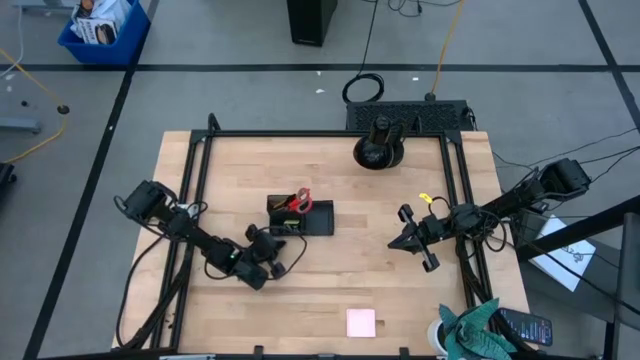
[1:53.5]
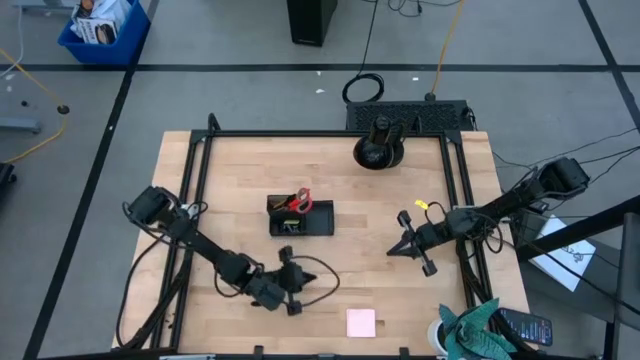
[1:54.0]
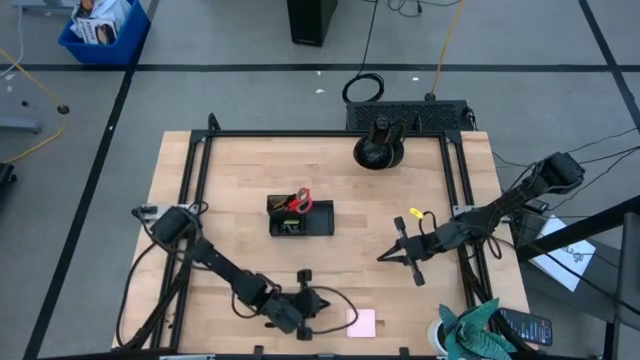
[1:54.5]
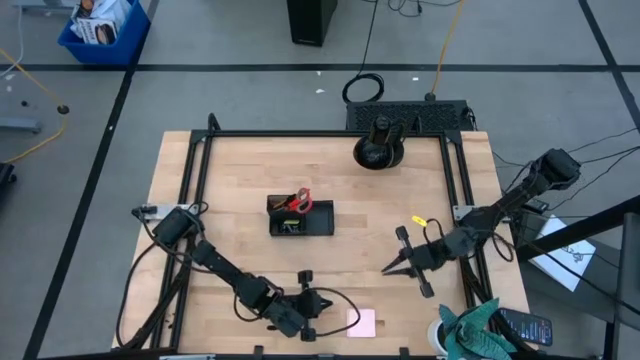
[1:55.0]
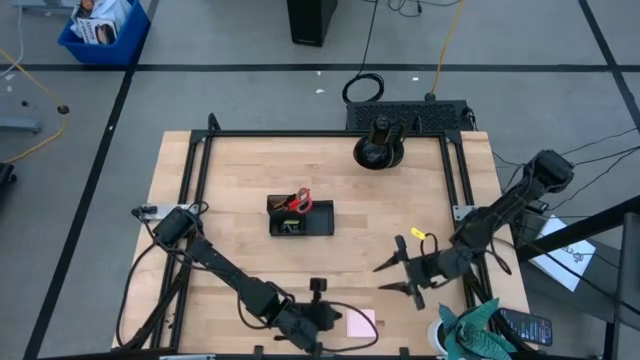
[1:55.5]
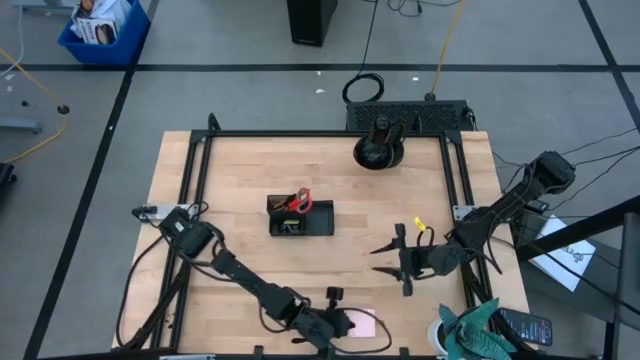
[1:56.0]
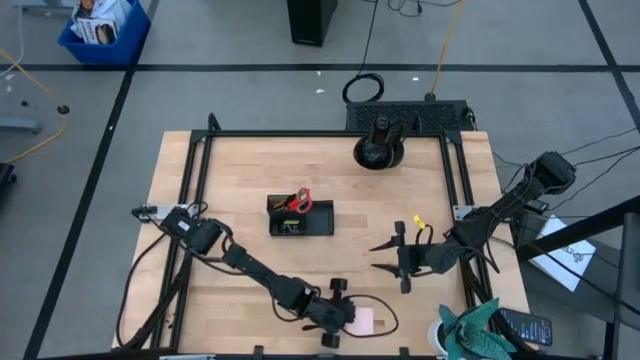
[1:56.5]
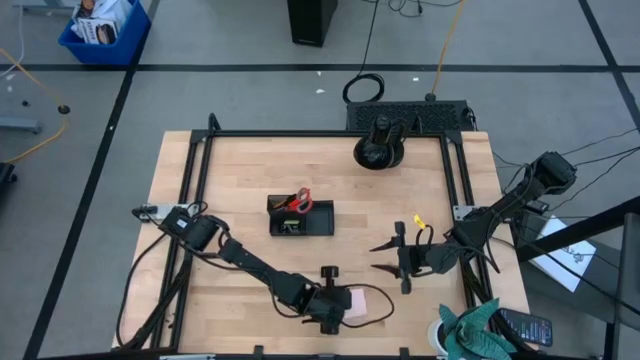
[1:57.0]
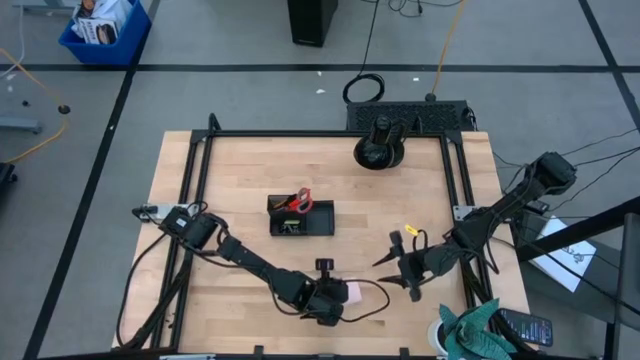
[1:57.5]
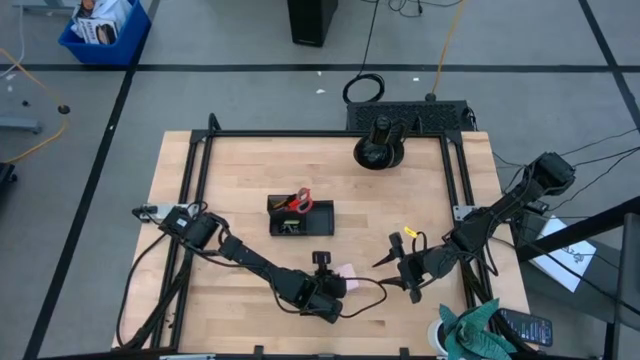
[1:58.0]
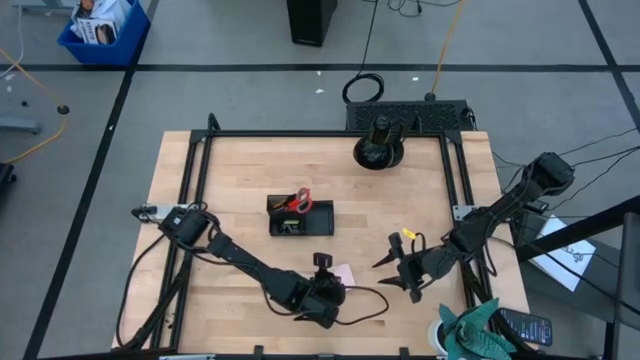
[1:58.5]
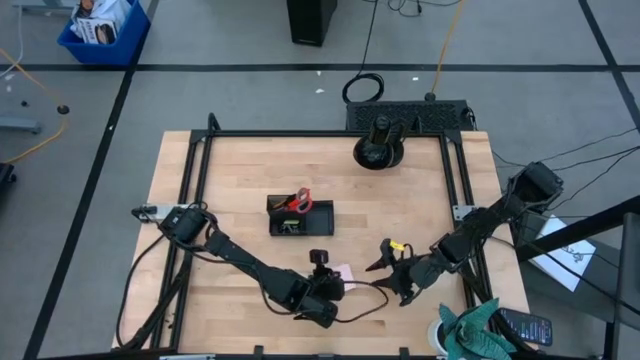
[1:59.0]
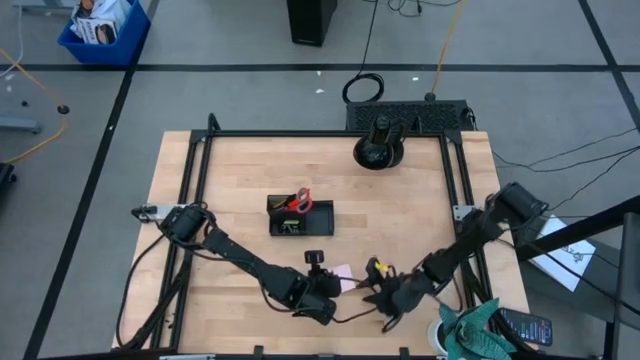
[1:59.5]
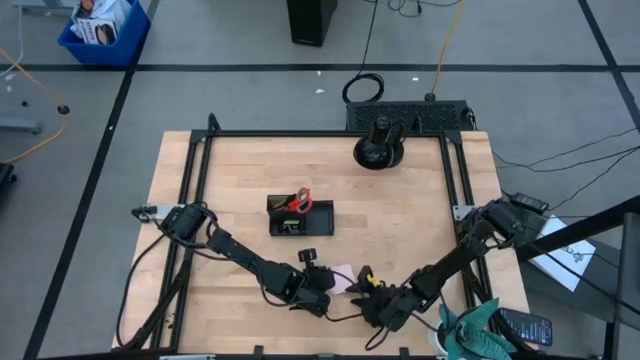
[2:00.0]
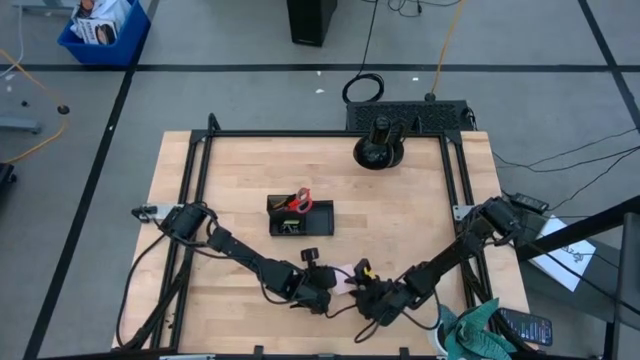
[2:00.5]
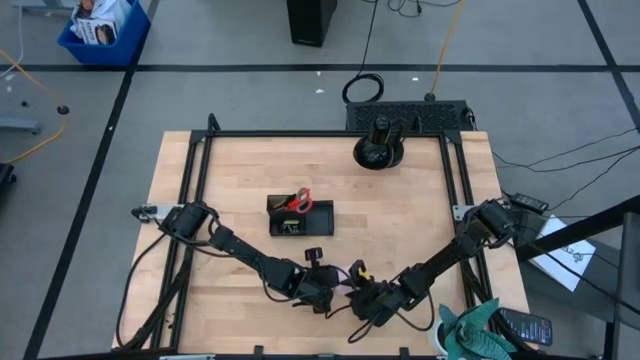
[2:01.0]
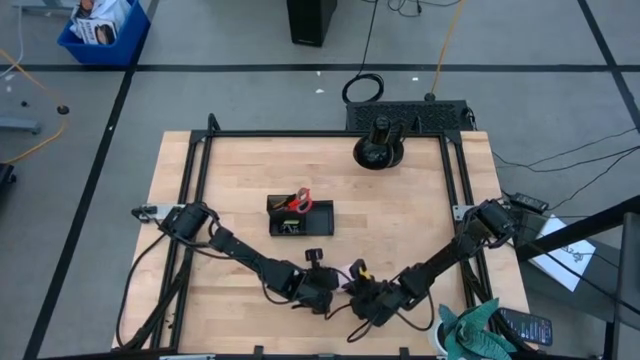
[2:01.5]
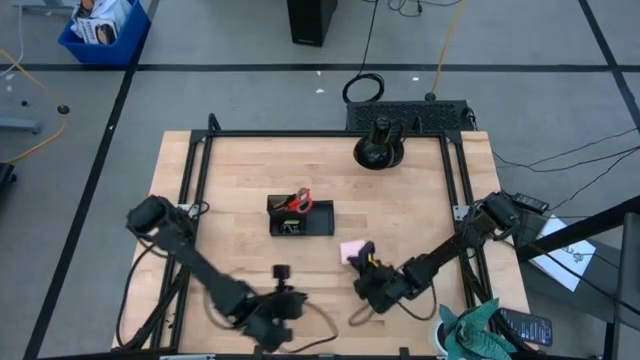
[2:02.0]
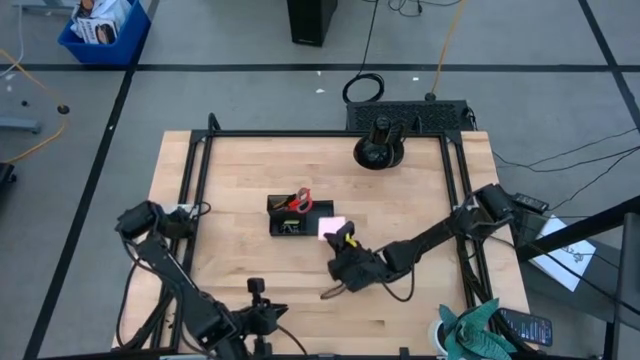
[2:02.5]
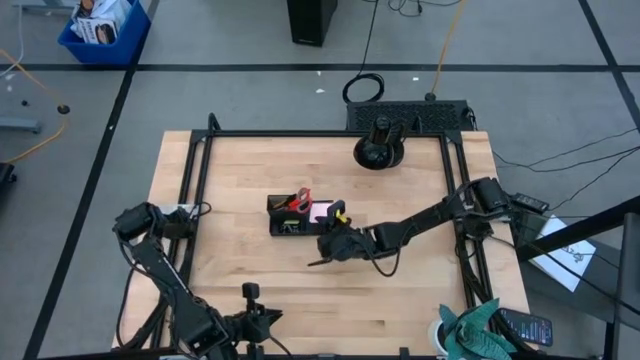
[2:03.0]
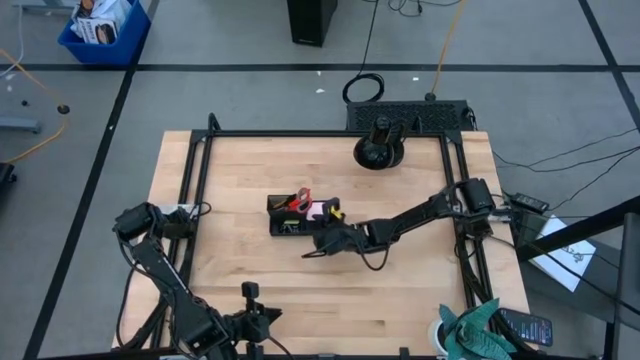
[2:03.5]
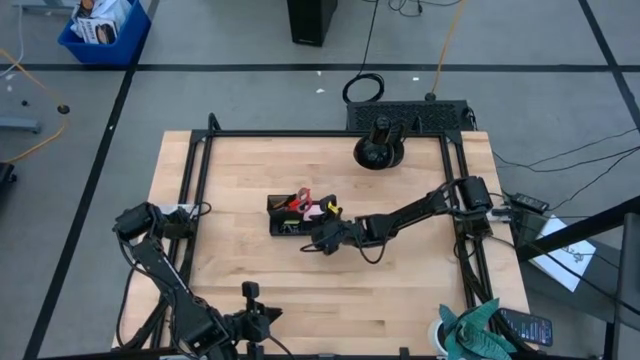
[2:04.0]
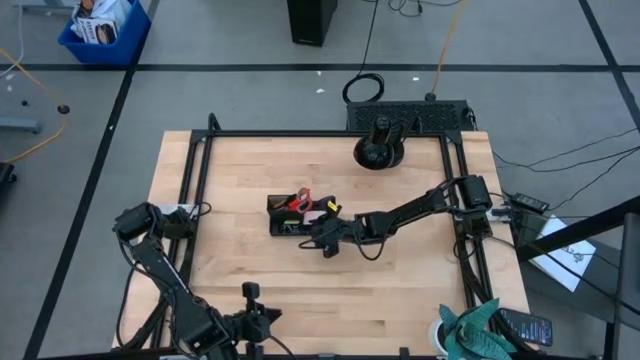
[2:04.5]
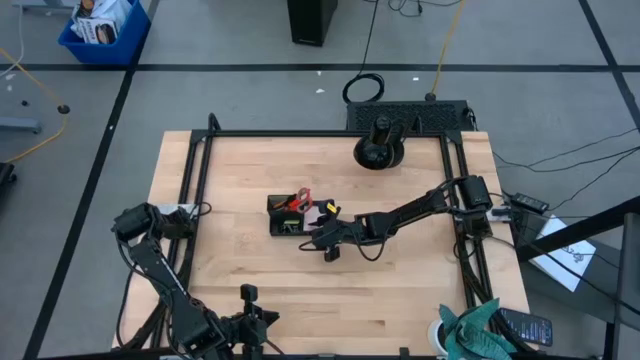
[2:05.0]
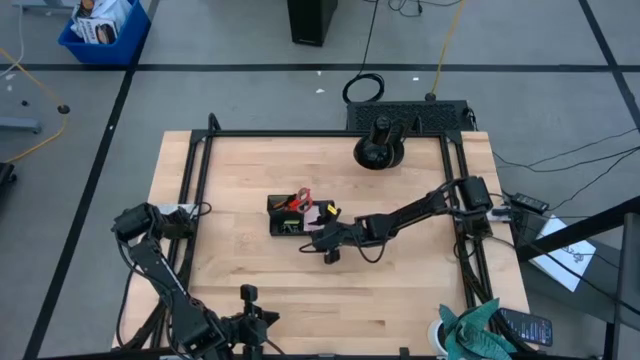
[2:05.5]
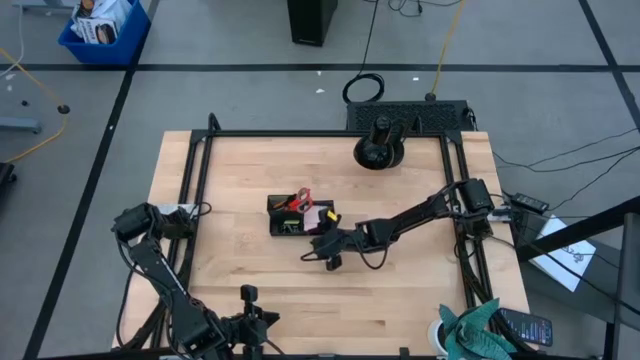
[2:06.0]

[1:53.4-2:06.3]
Task: Pick and place office supplies into organizer
Put the pink sticky note into the black desk organizer

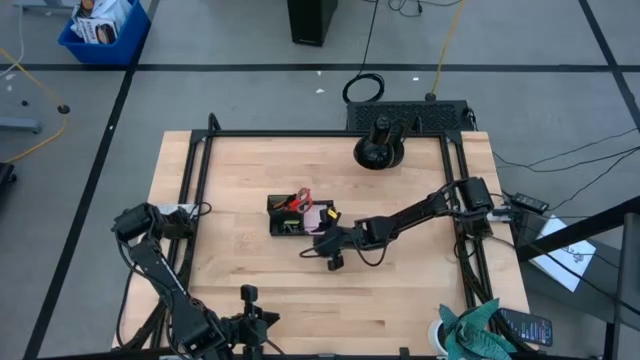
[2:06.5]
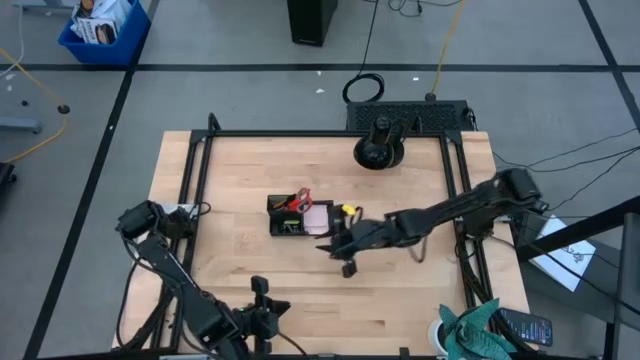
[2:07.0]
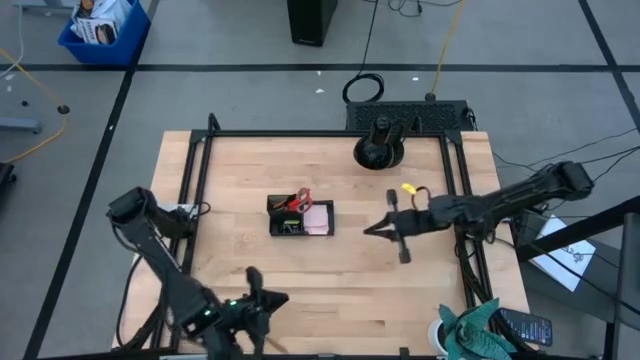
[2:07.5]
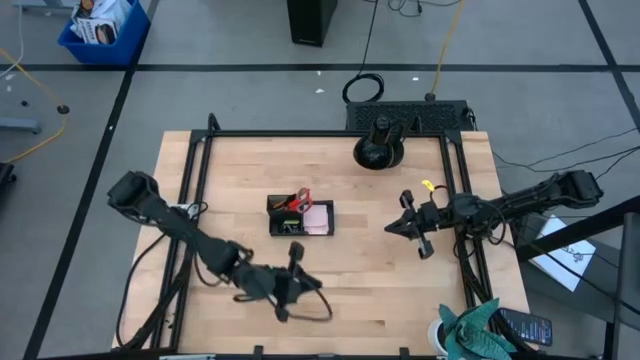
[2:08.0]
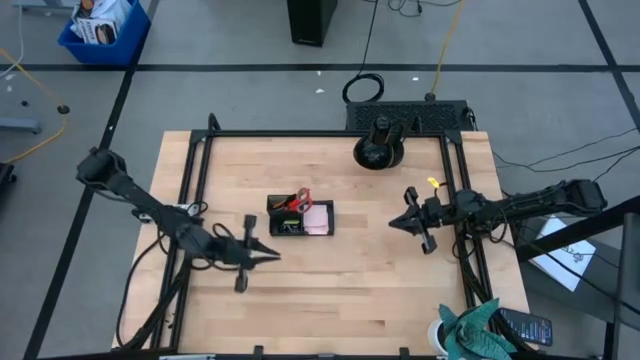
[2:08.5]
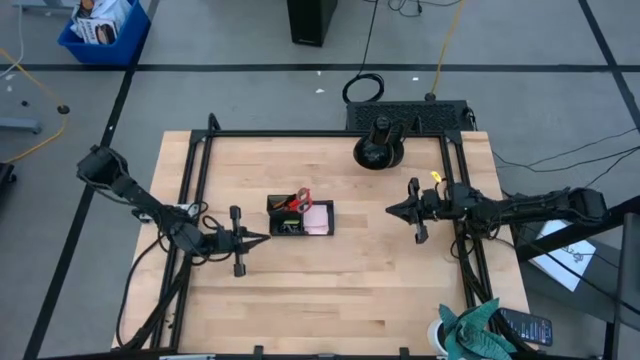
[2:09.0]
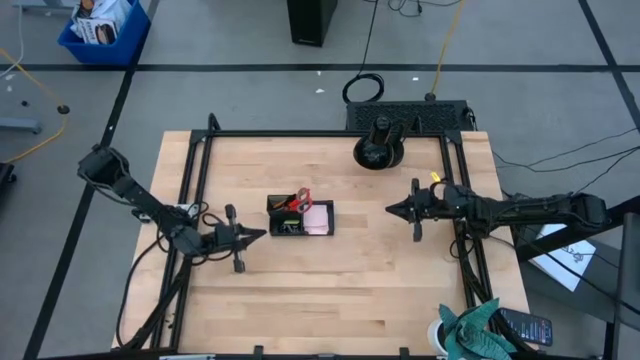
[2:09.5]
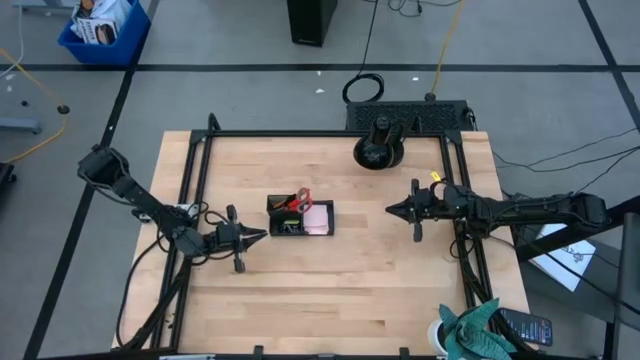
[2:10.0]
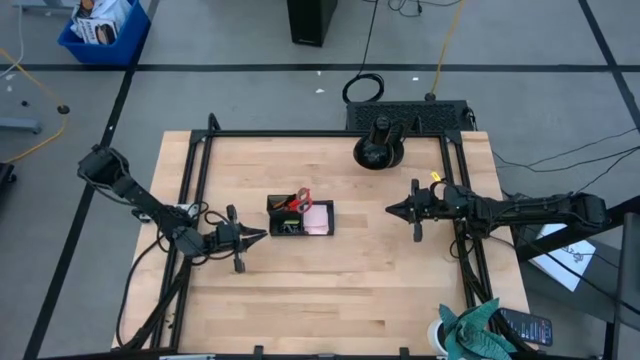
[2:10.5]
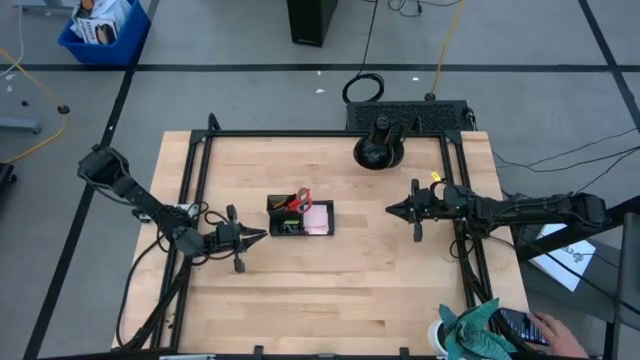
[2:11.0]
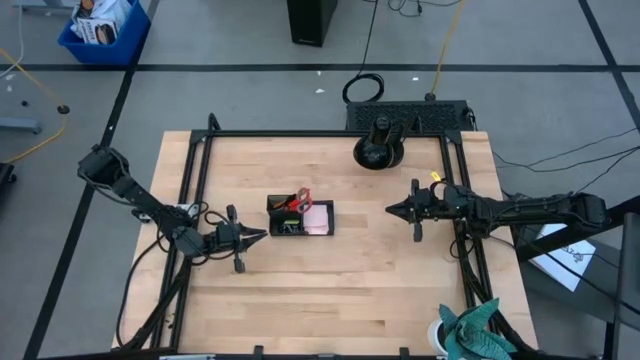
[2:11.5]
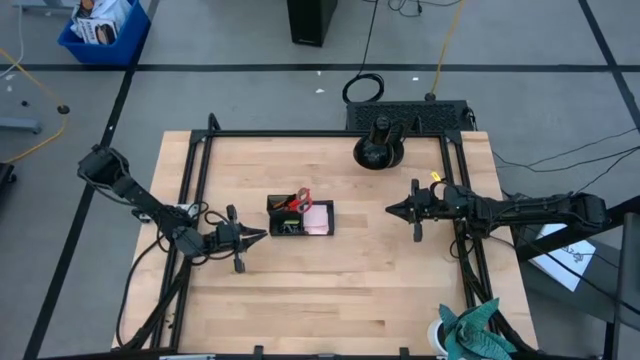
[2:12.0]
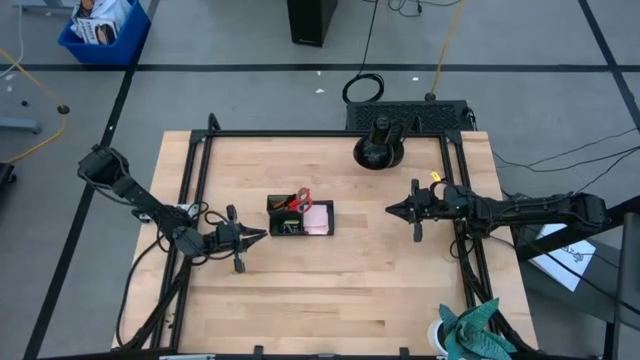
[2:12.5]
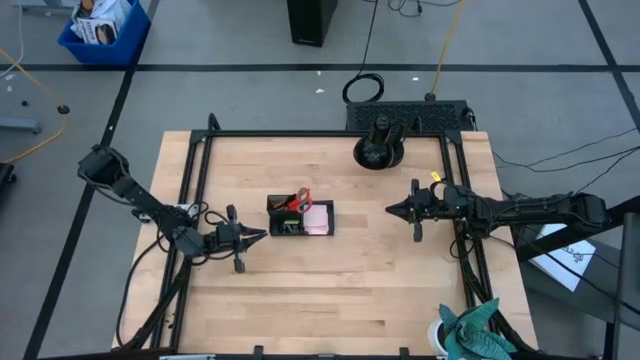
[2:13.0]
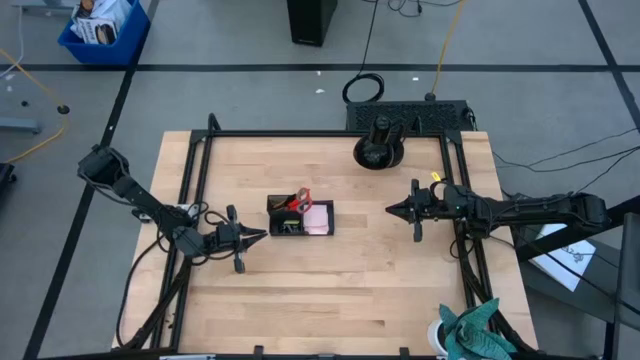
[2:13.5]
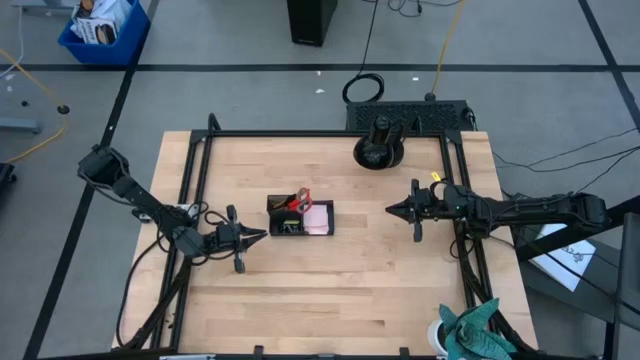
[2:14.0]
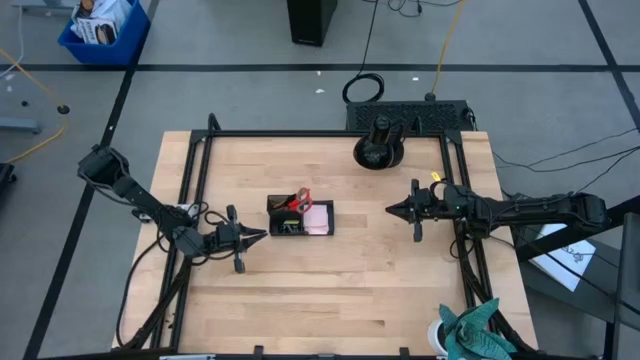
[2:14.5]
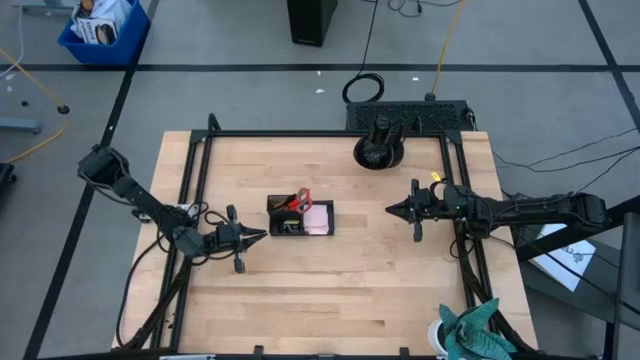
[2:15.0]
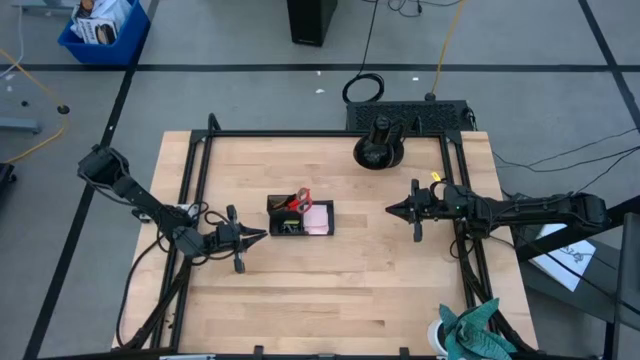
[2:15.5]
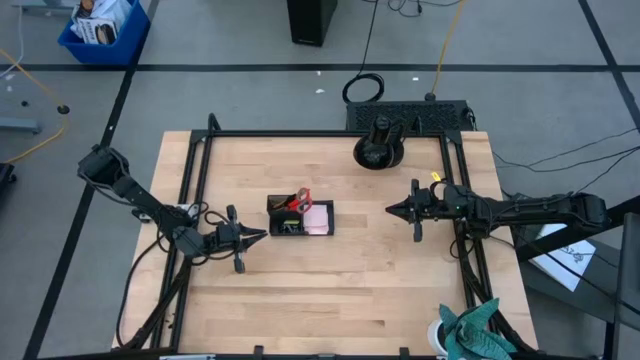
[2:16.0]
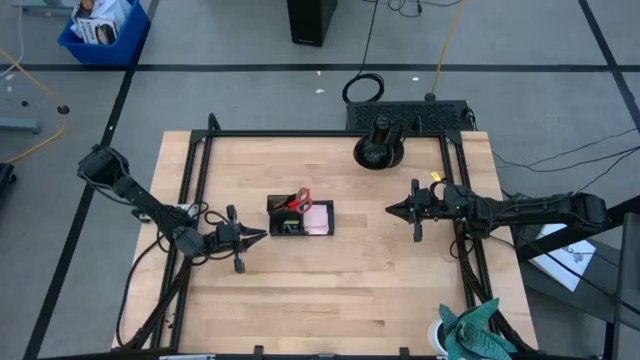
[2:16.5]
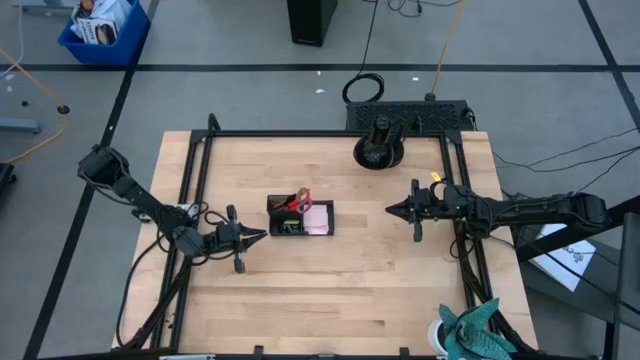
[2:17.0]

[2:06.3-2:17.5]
Return to Home Position
